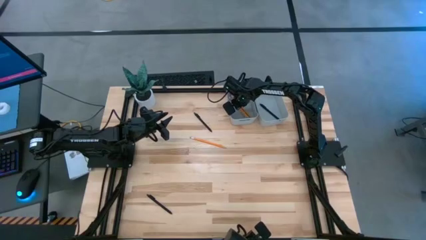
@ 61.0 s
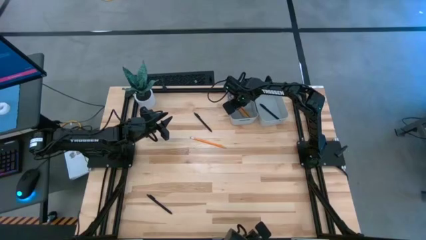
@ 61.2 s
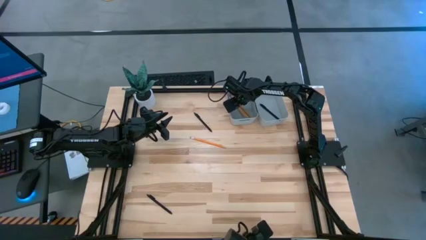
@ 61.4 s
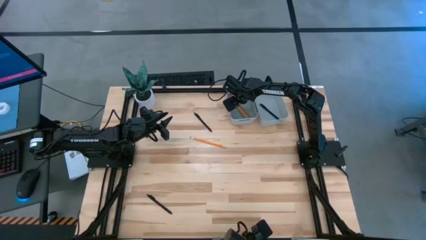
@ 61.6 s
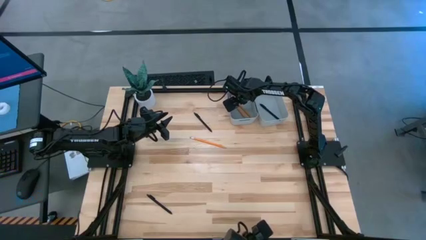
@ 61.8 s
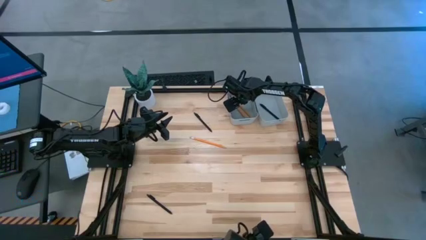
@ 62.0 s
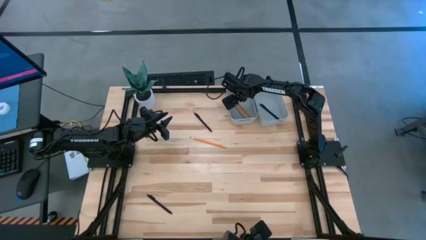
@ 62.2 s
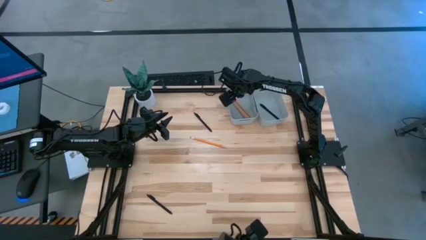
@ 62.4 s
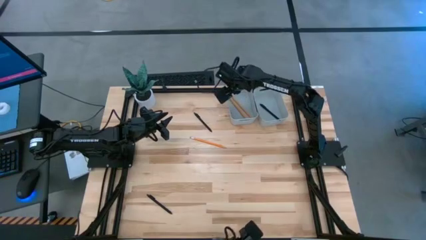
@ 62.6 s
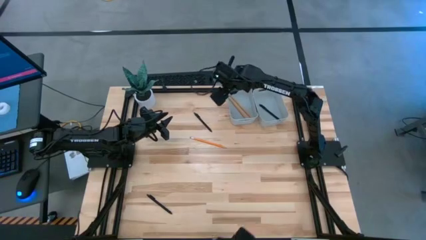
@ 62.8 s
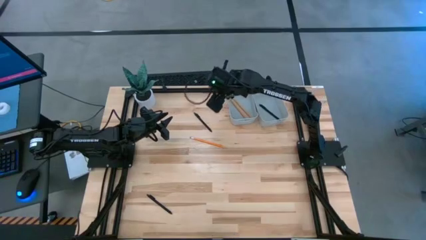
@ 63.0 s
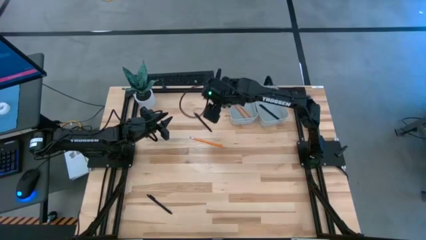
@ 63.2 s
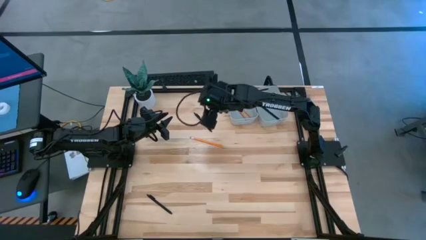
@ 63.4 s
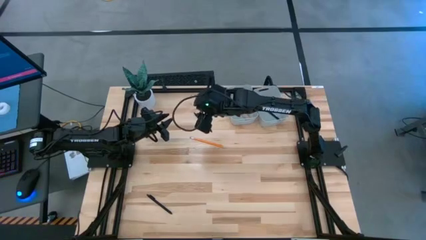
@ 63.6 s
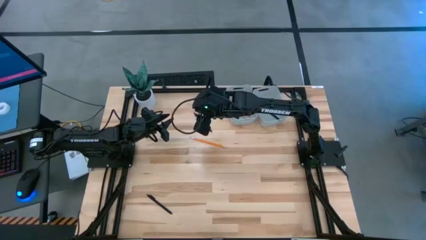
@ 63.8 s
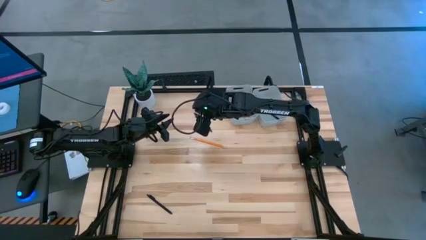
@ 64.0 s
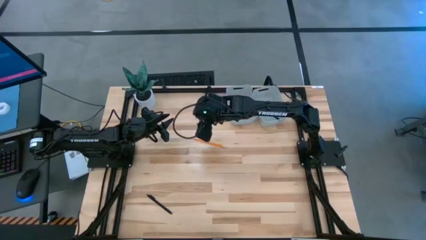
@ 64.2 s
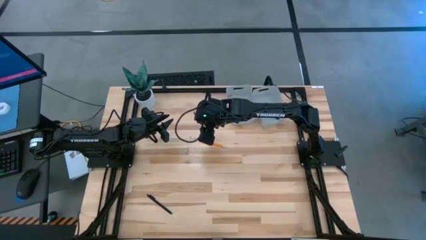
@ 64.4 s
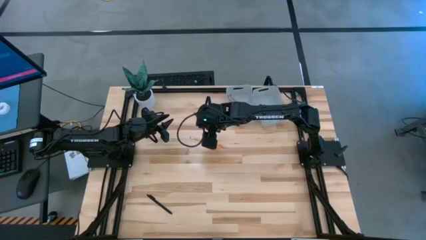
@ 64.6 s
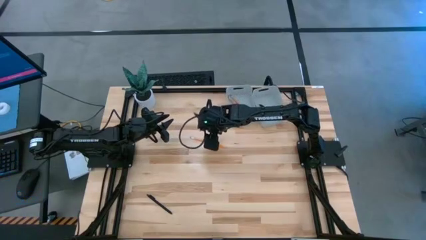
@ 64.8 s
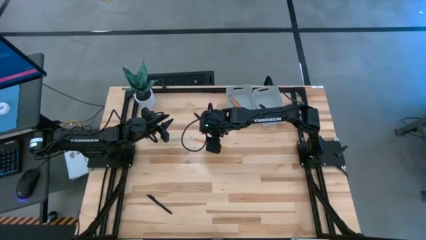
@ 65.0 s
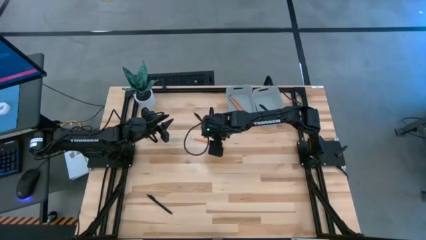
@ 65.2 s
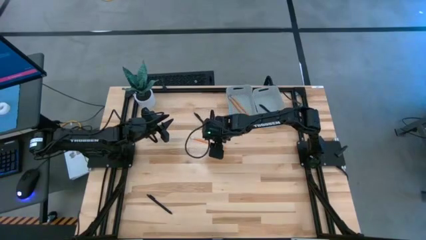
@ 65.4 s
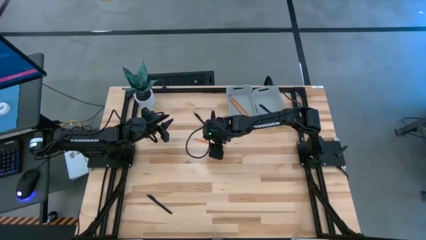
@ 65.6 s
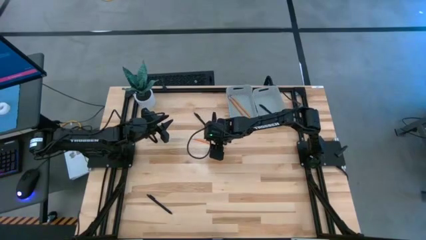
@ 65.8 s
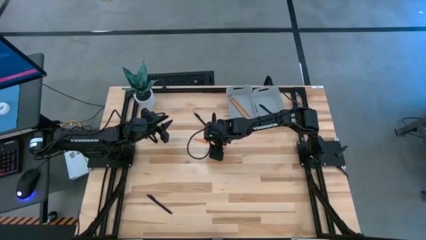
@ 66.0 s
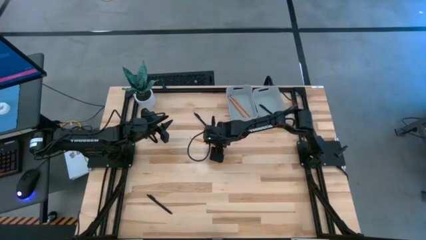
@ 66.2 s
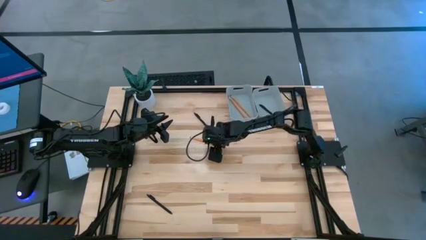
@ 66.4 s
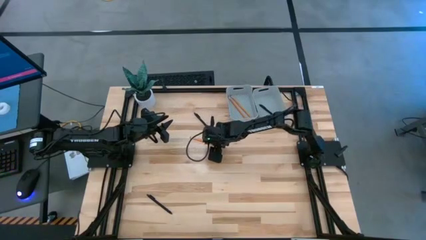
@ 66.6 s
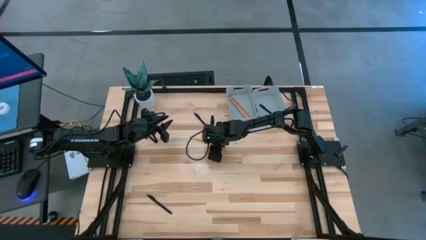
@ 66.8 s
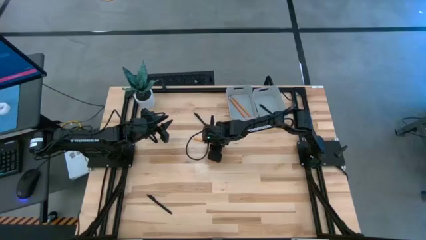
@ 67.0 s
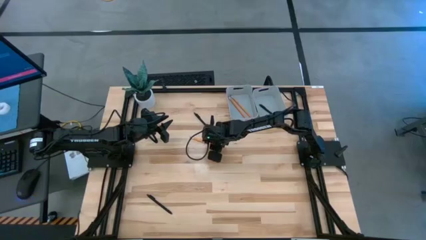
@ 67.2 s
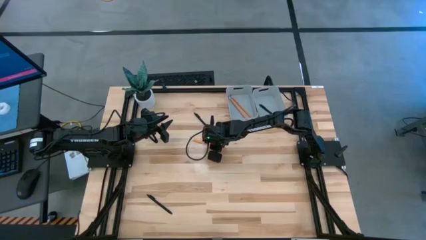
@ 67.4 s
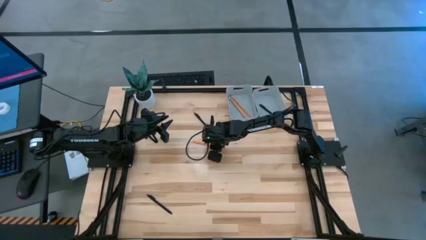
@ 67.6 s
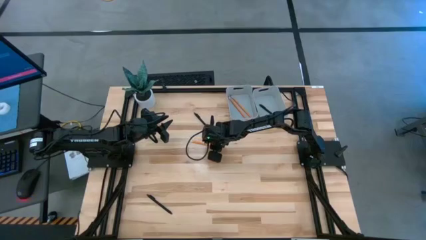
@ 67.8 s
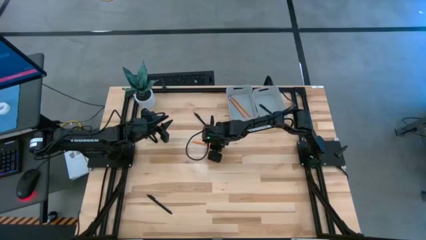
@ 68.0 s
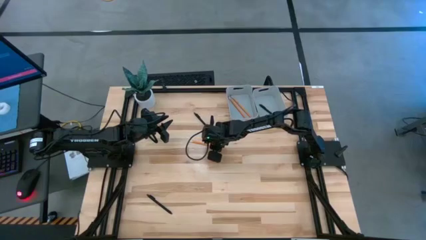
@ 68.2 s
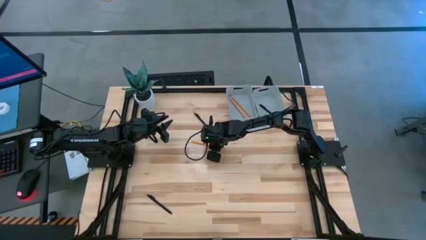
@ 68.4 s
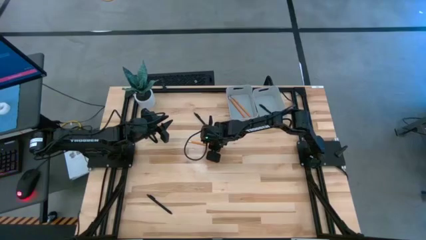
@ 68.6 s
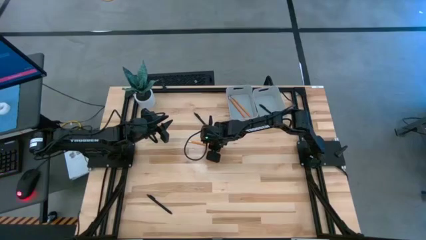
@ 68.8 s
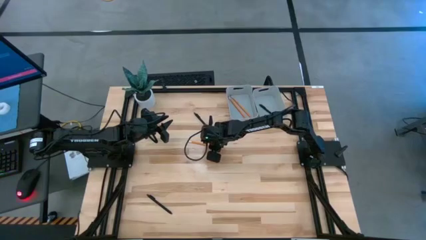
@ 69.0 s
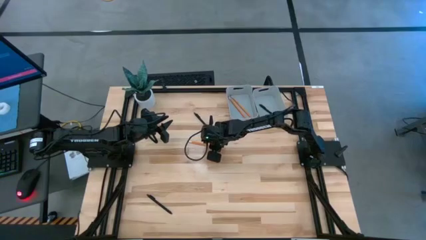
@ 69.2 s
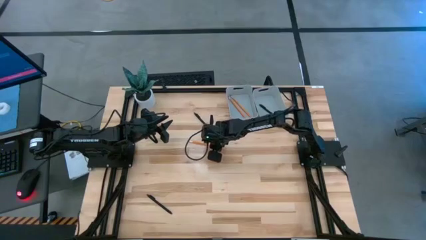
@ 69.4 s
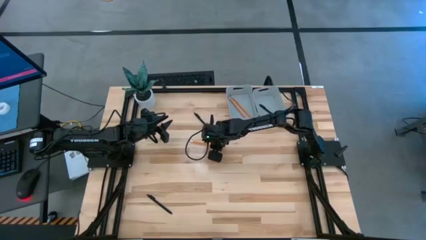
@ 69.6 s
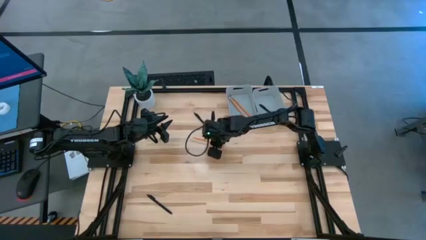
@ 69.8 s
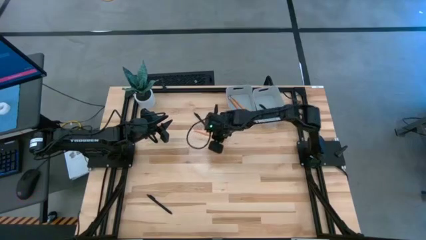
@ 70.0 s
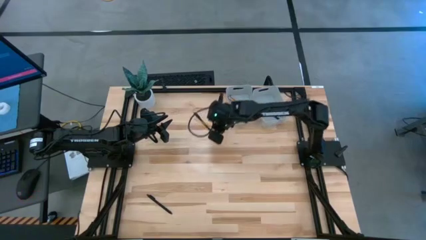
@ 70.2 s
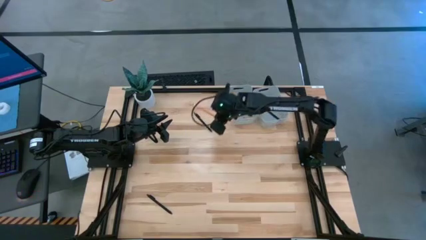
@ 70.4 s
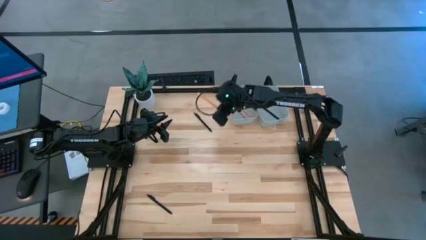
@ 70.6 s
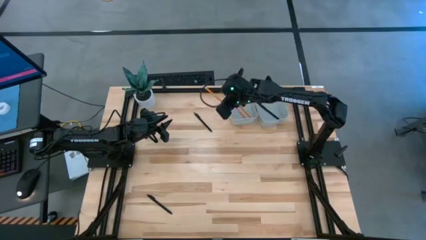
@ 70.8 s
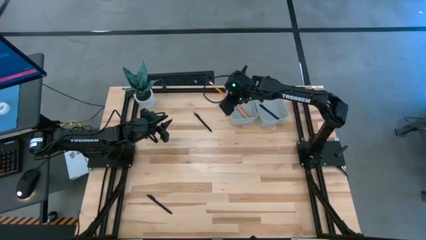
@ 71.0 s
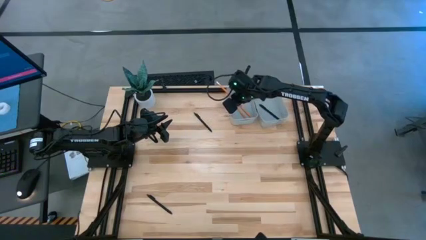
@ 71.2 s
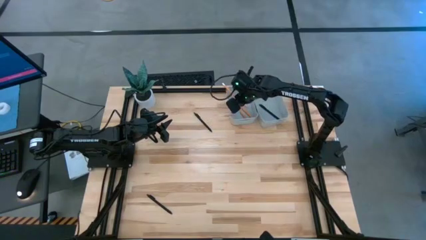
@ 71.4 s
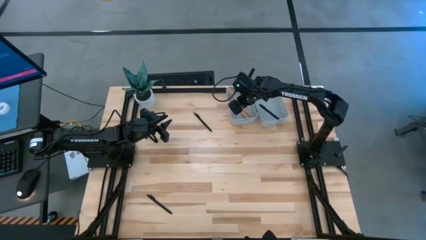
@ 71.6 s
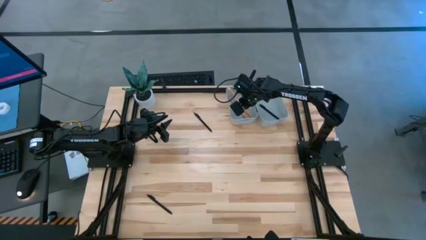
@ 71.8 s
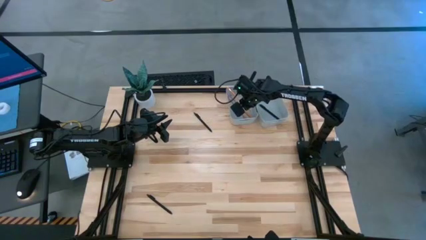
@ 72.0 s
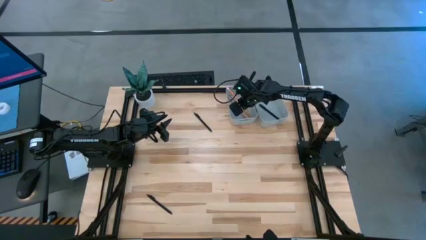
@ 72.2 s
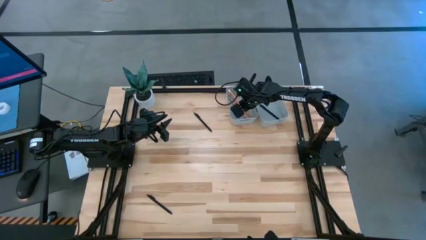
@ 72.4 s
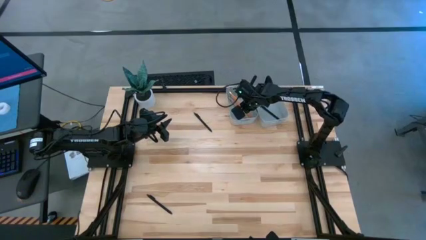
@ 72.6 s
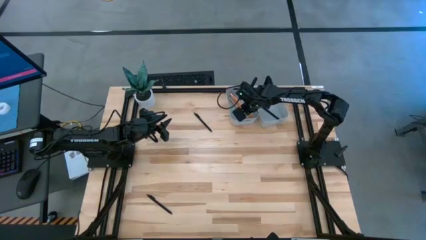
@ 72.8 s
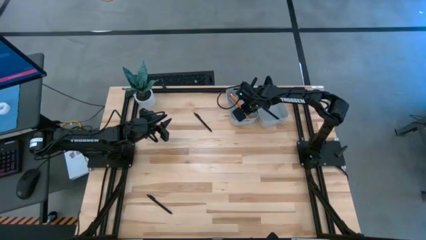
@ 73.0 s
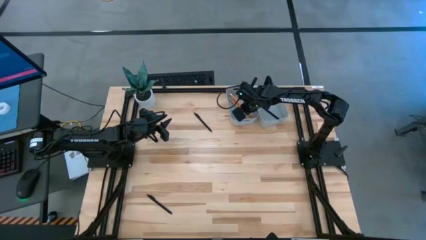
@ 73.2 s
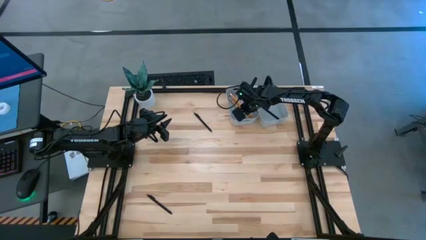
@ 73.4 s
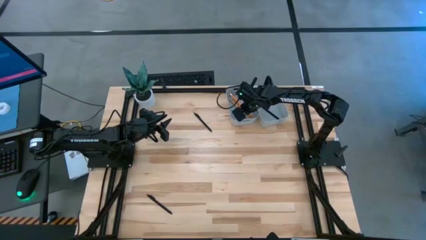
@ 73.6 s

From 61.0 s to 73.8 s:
Task: Sort pens & pencils
Put the yellow pencil into the left gray bin
